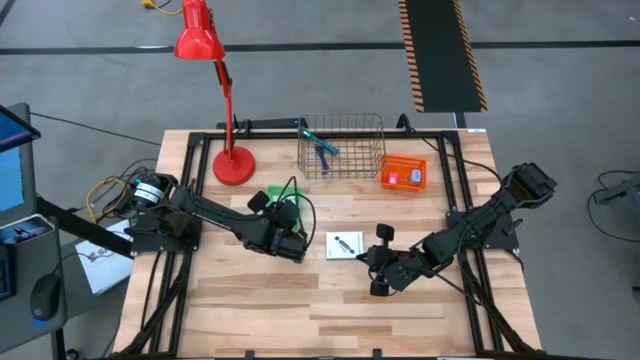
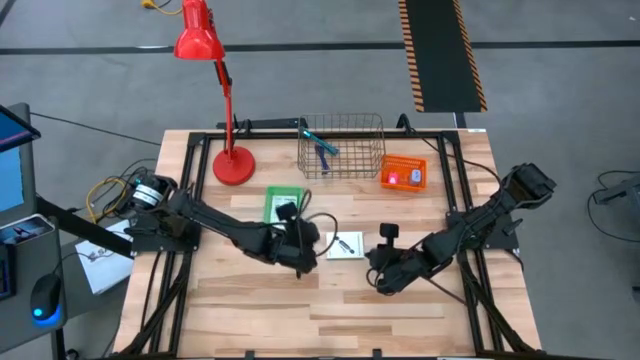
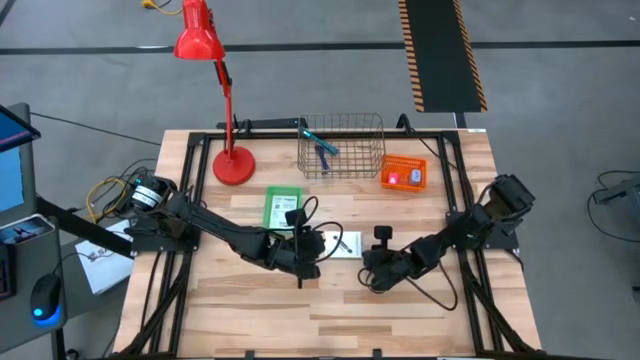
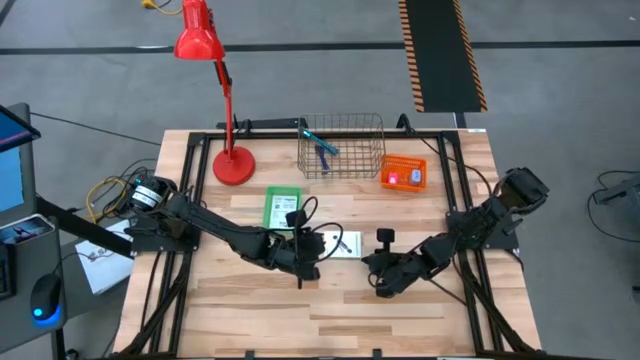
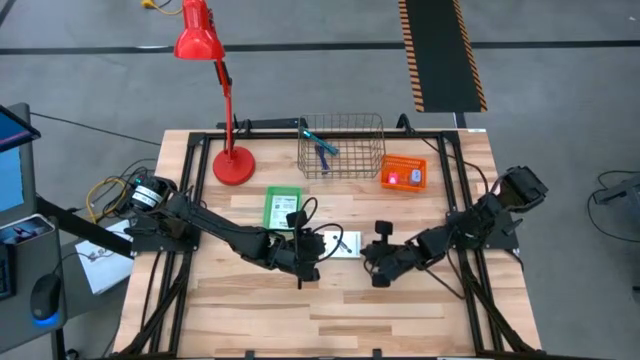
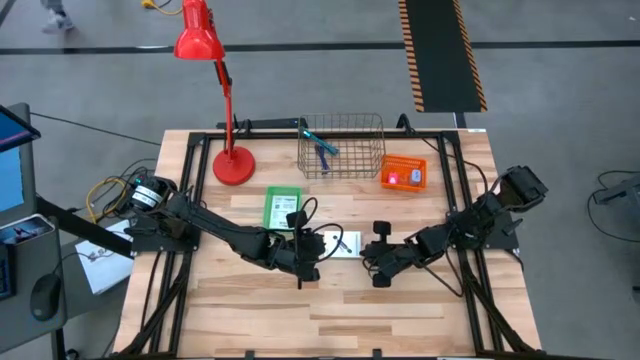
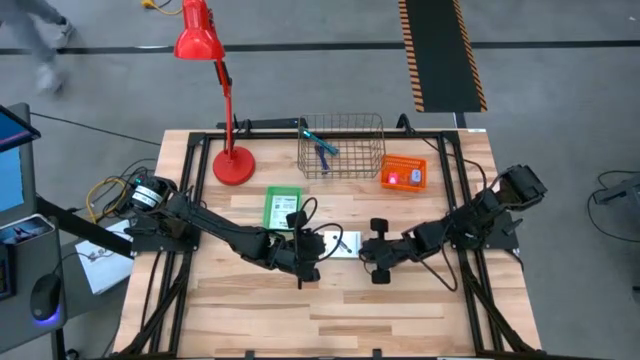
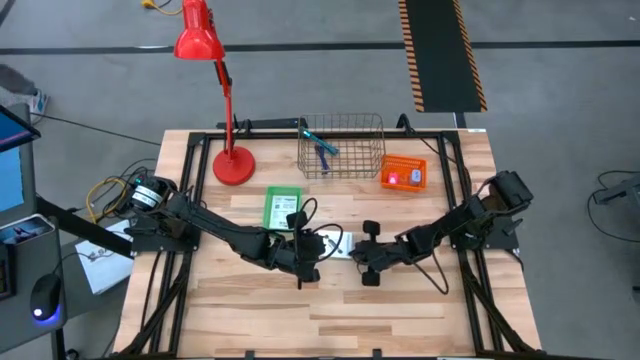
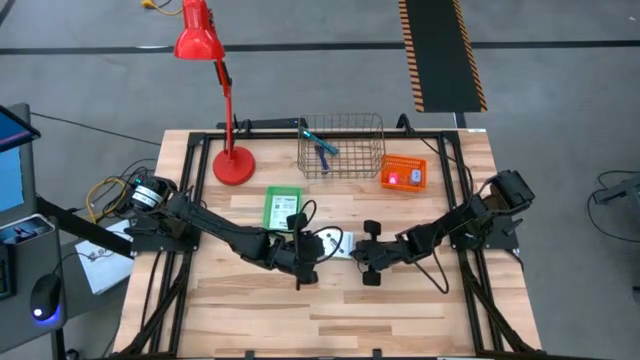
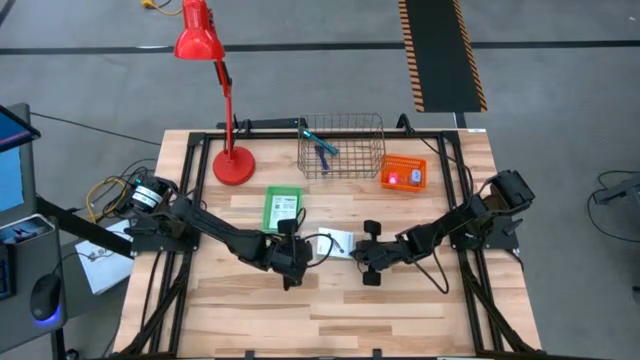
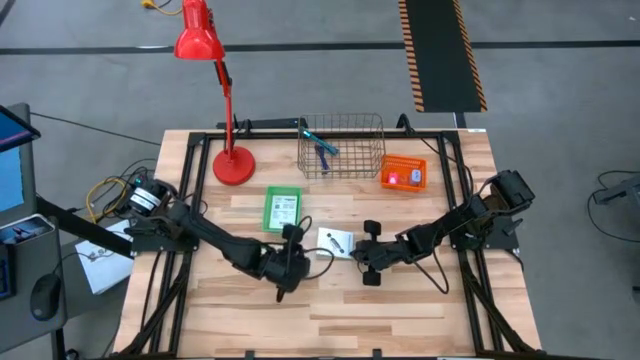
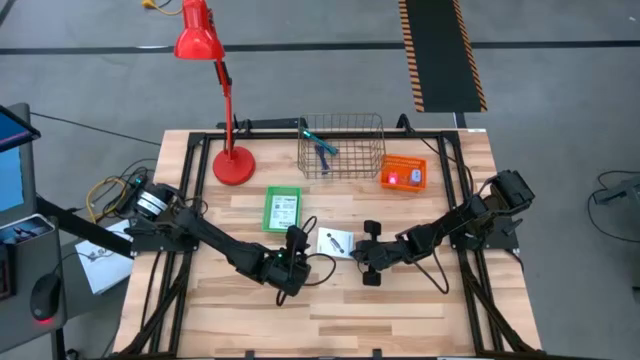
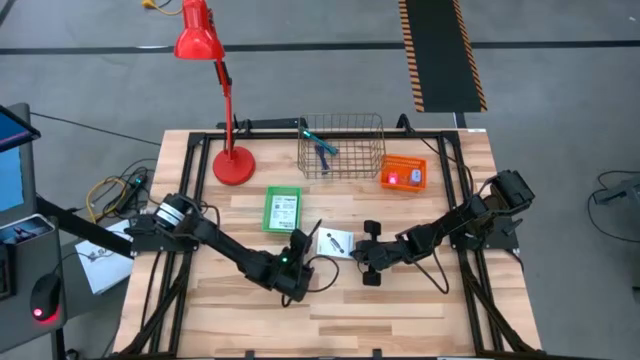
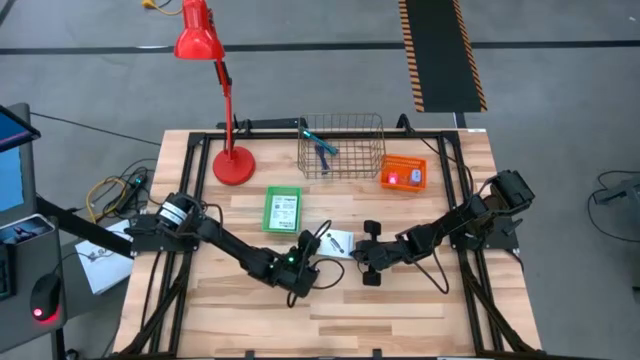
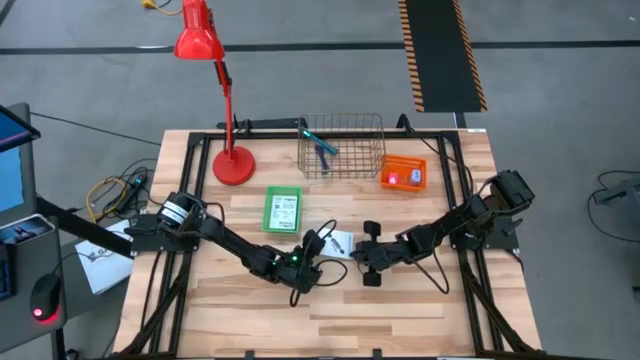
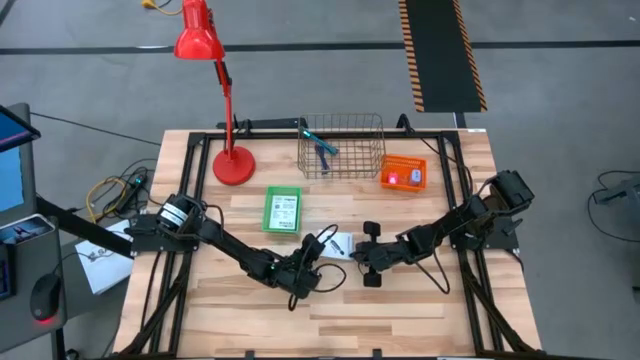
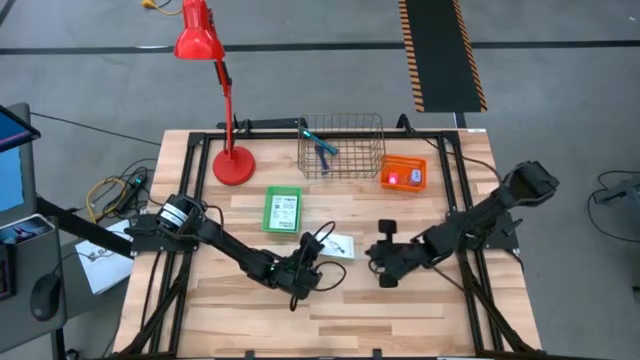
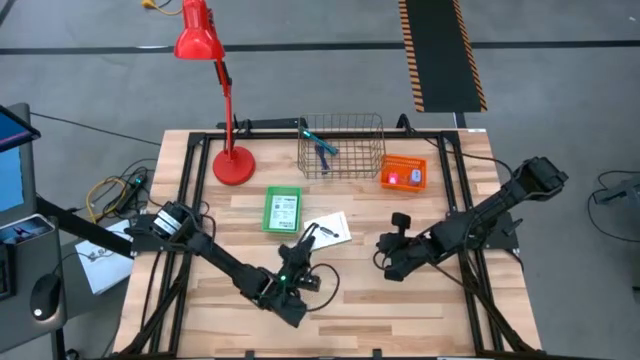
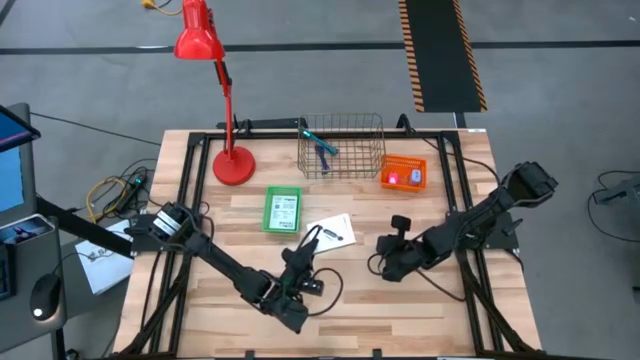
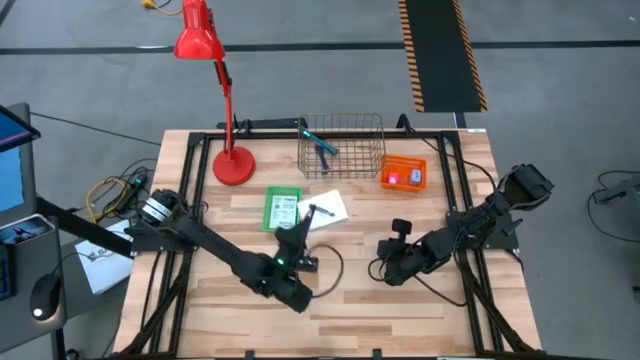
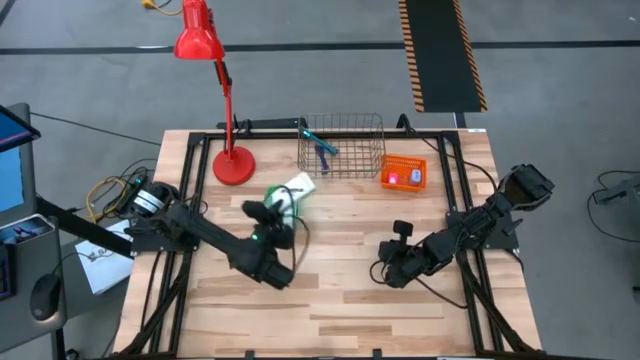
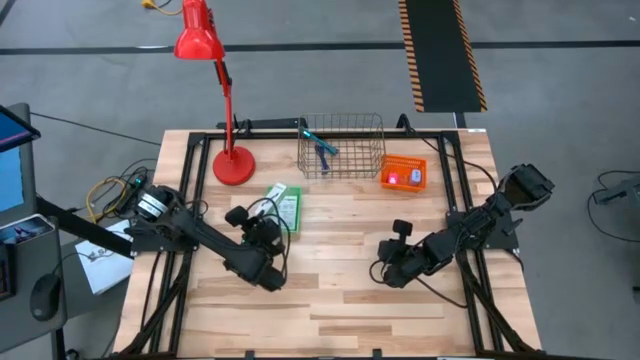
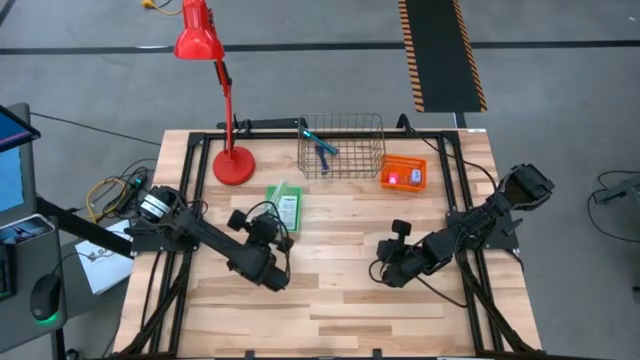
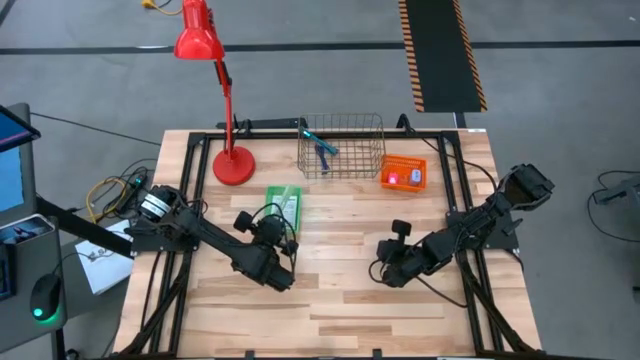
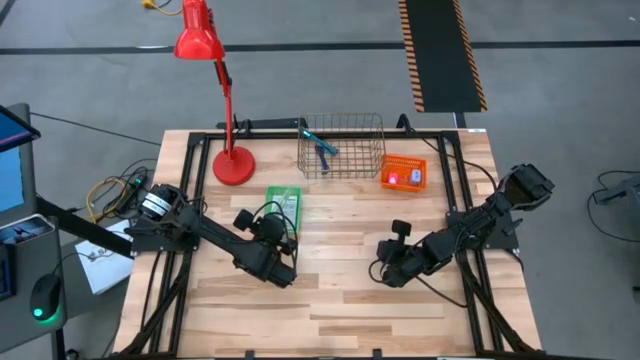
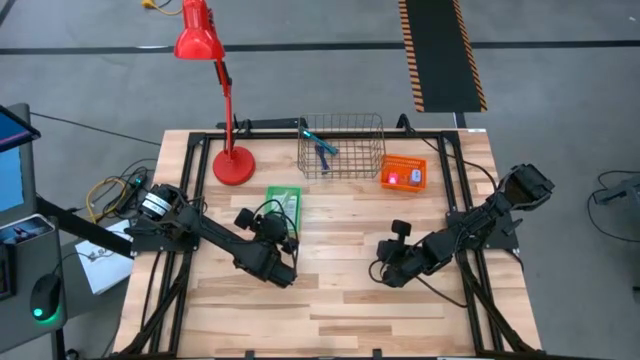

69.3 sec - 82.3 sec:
Task: Pick and place items into bin
Put the card reader box into the green basket
